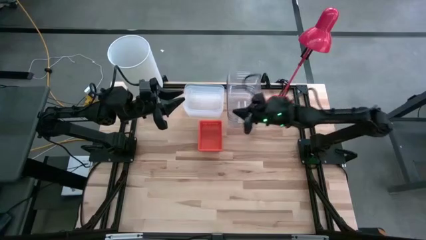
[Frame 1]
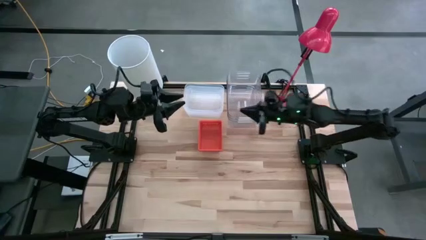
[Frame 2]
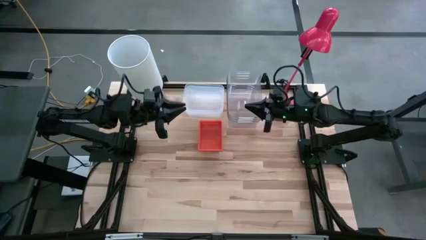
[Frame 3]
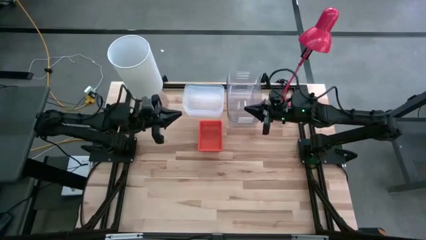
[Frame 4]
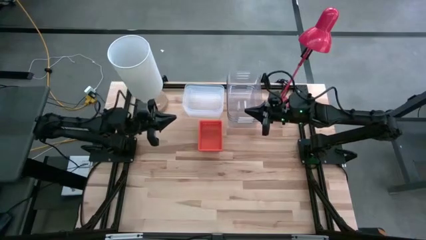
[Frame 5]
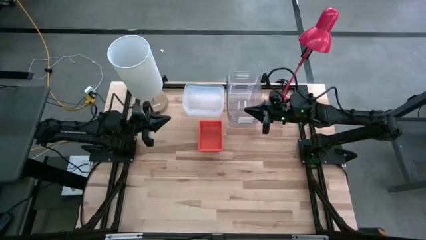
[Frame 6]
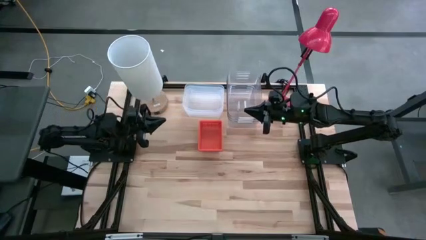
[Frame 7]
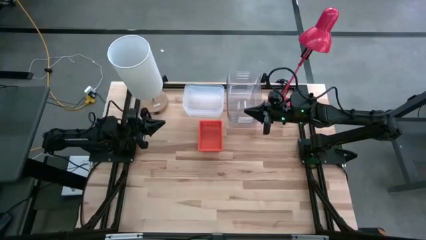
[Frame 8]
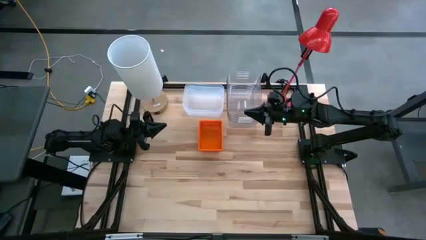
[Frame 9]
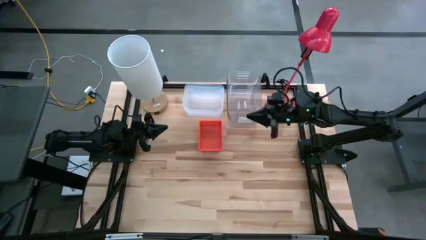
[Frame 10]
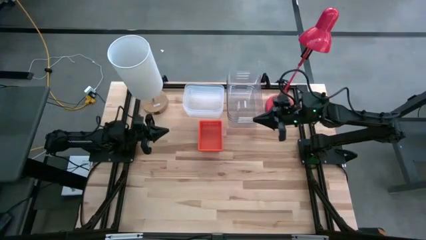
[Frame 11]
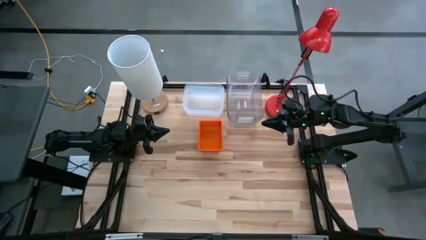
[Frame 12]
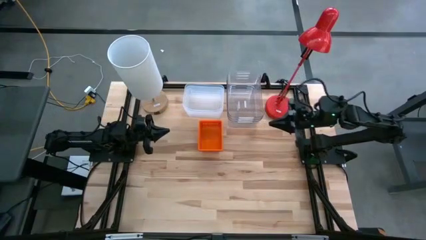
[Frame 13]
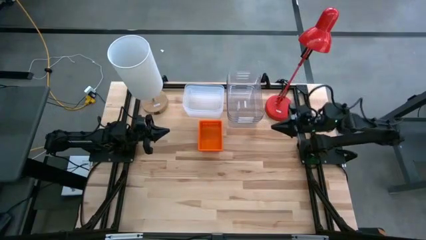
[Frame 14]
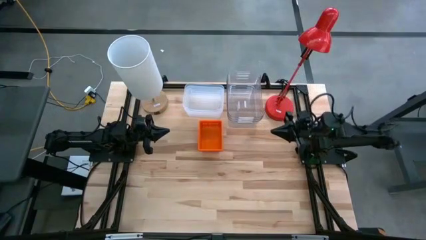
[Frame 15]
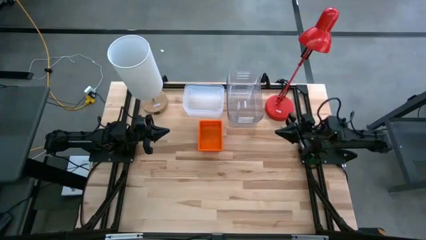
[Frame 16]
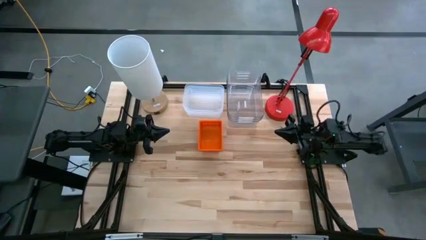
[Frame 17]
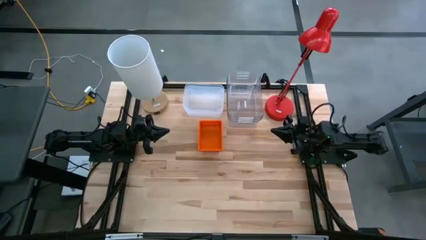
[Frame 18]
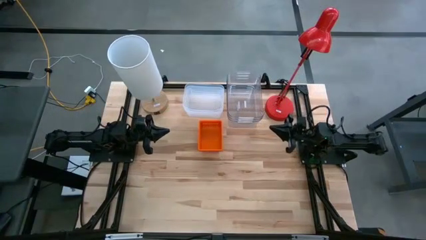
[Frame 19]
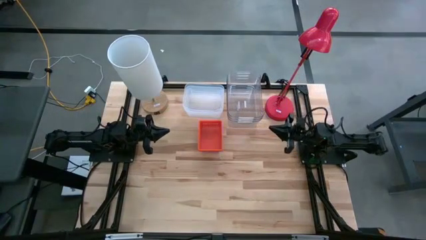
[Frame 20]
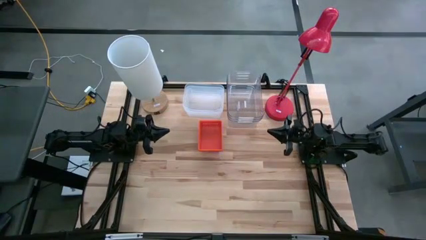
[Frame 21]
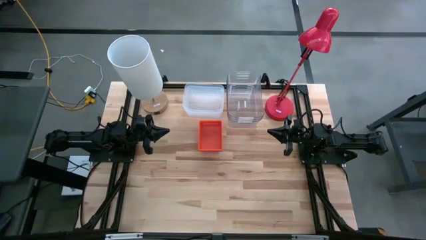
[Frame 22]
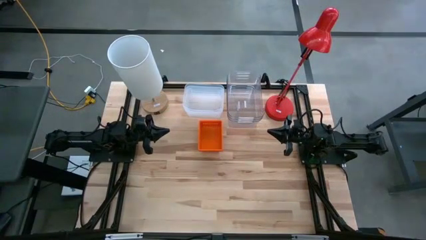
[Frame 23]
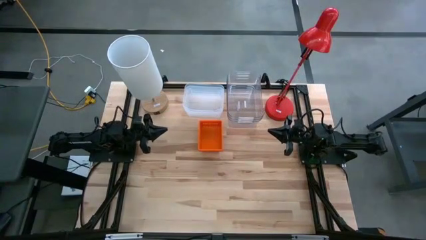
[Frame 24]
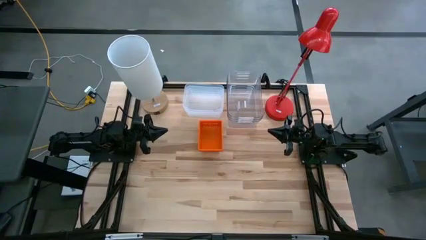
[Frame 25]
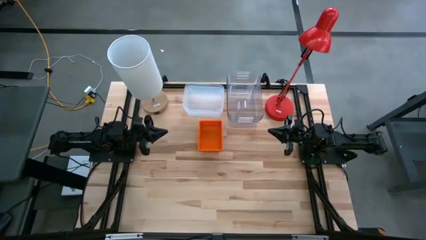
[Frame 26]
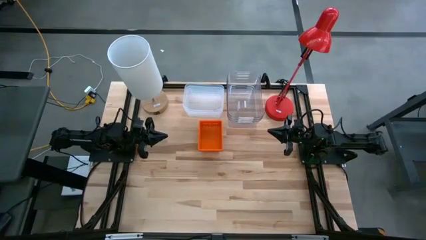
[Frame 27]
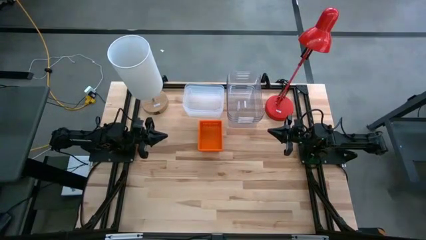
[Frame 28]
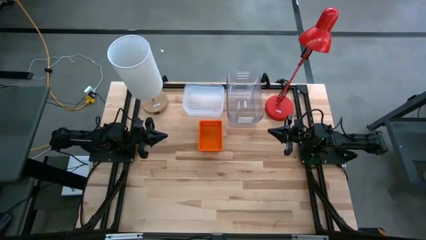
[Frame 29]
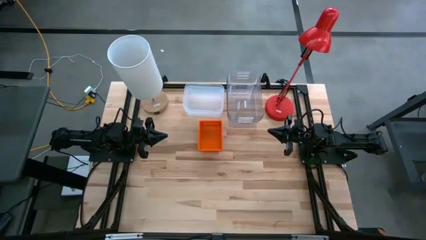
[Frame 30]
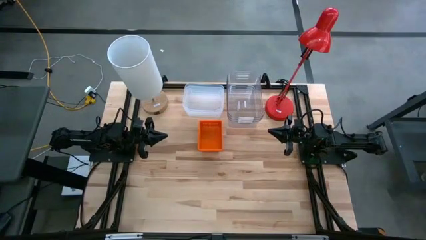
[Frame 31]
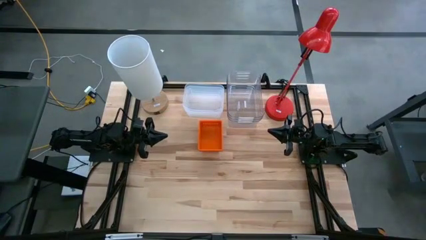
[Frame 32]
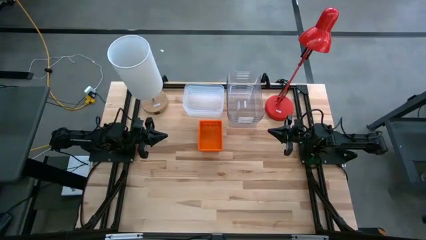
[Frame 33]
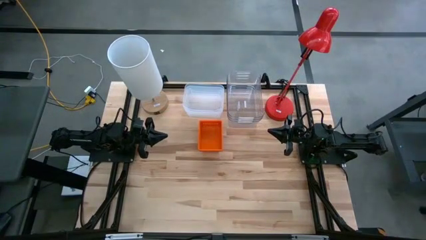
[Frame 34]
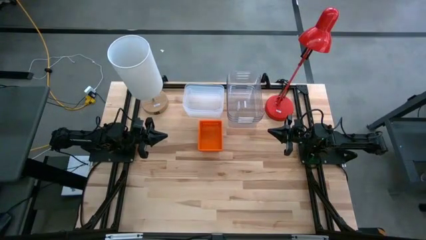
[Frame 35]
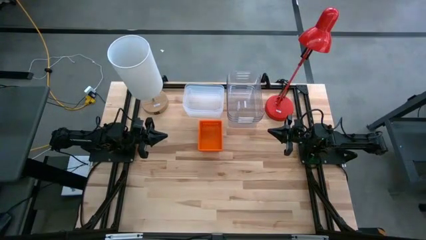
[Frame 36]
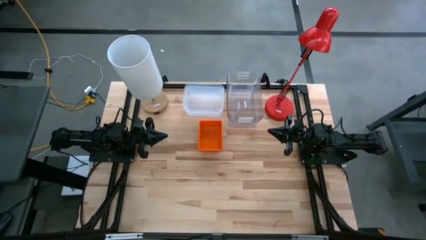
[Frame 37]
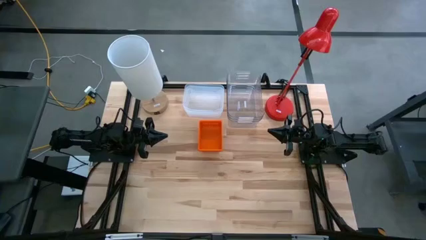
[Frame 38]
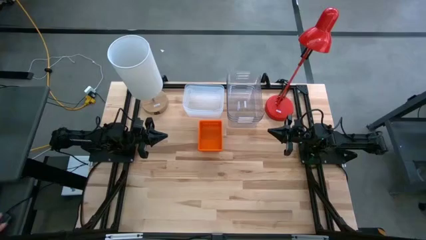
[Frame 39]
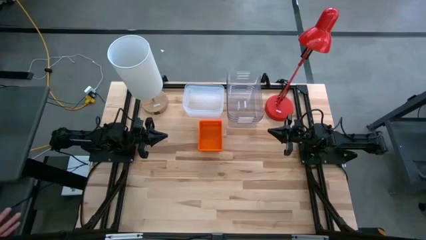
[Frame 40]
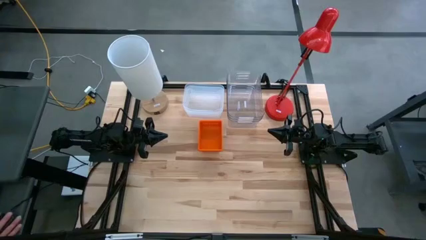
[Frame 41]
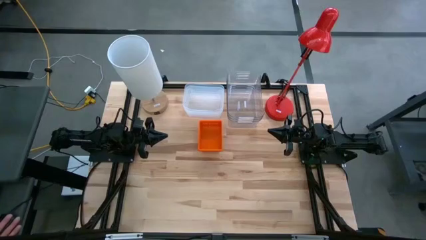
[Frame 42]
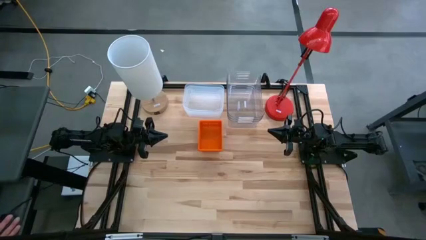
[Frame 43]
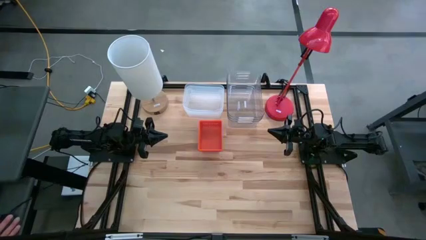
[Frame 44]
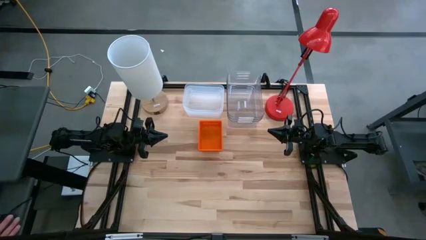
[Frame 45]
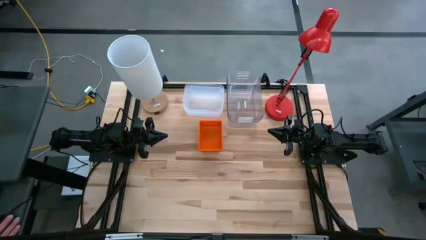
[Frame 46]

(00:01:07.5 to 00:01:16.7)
Return to Home Position
